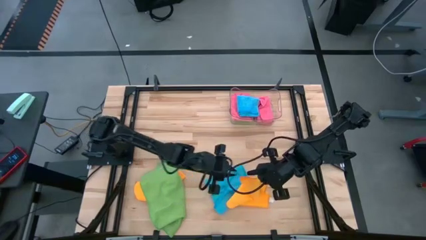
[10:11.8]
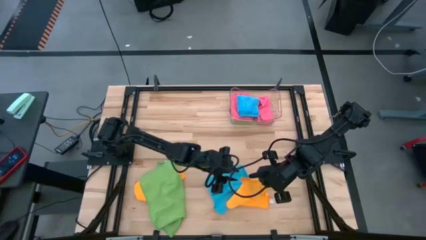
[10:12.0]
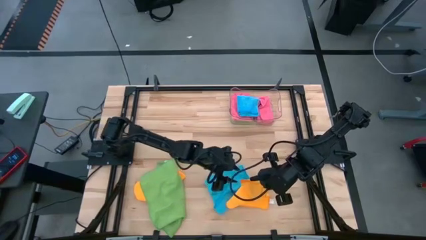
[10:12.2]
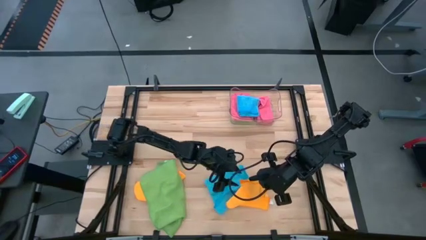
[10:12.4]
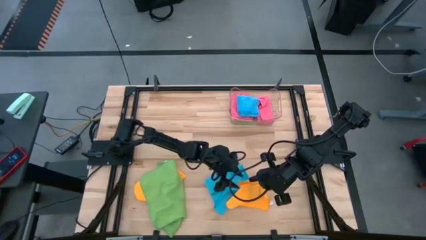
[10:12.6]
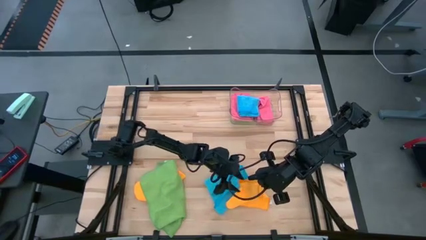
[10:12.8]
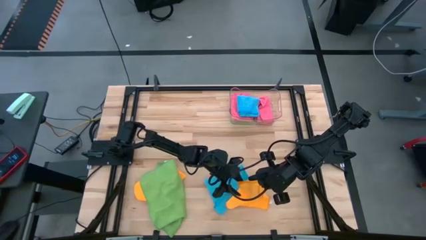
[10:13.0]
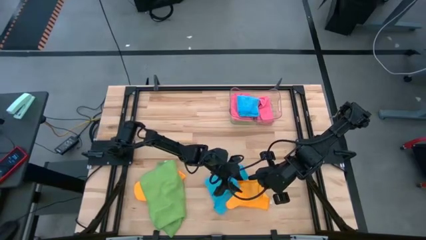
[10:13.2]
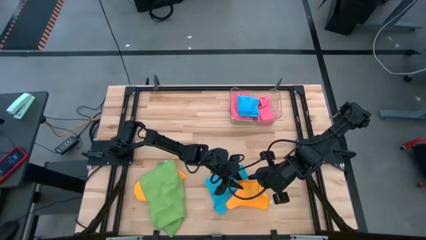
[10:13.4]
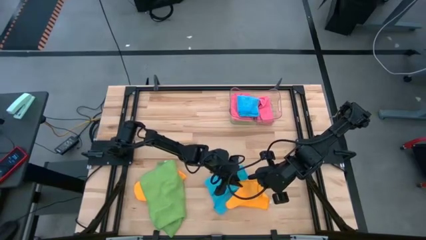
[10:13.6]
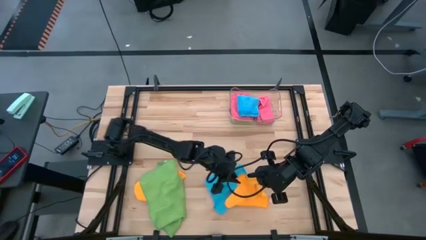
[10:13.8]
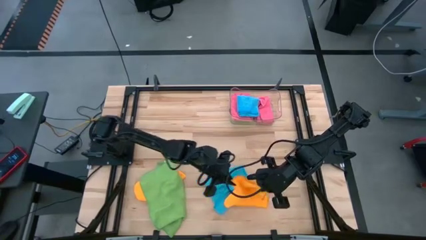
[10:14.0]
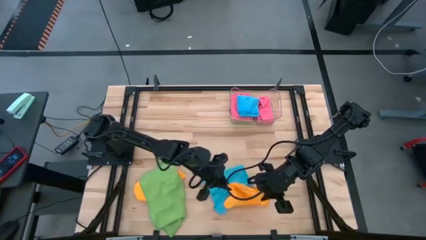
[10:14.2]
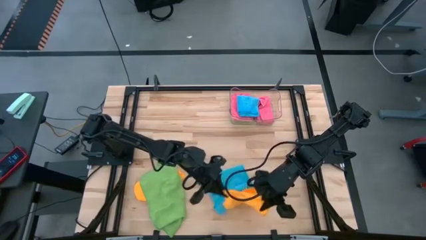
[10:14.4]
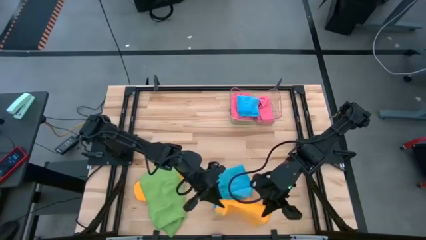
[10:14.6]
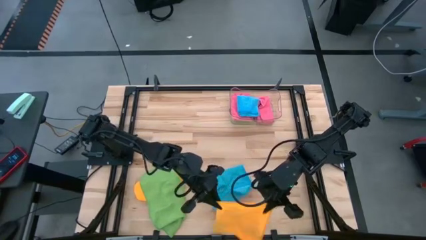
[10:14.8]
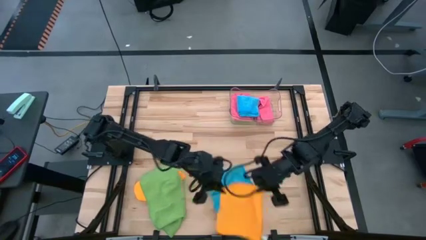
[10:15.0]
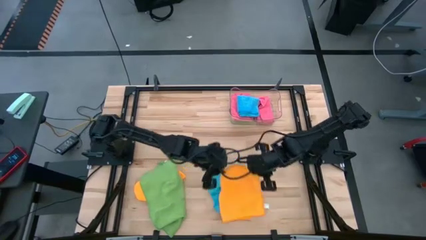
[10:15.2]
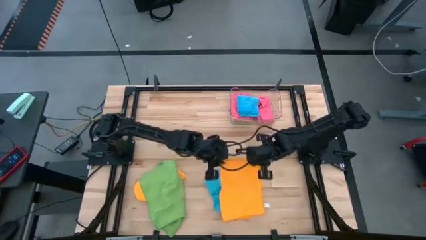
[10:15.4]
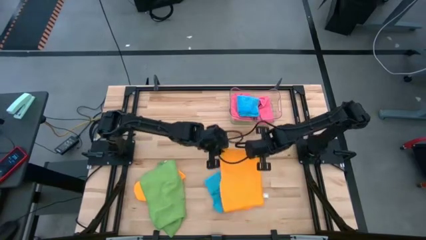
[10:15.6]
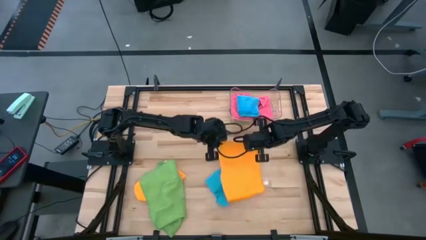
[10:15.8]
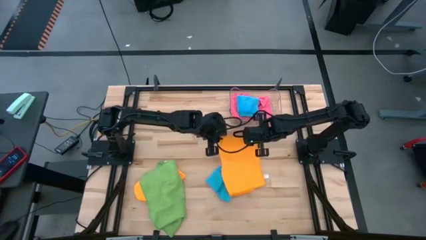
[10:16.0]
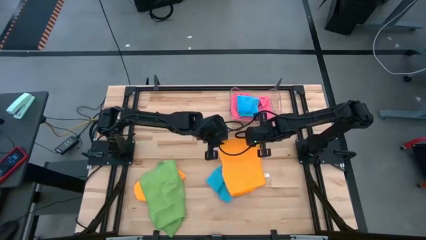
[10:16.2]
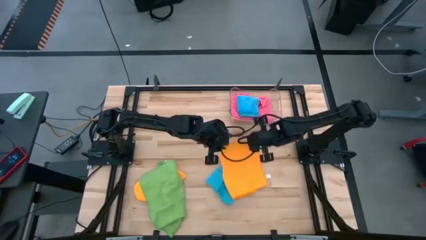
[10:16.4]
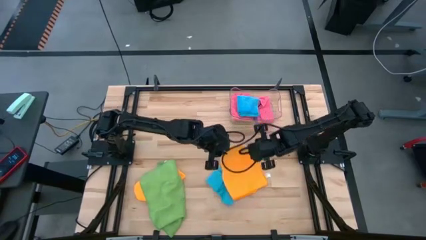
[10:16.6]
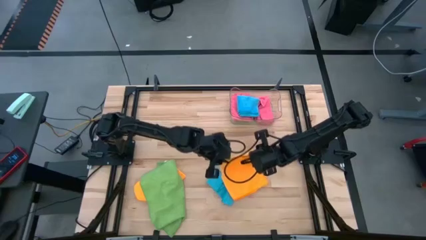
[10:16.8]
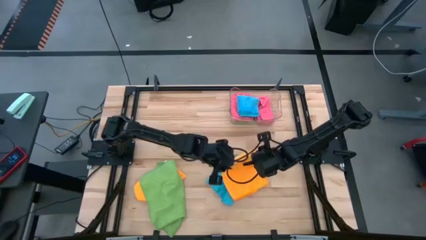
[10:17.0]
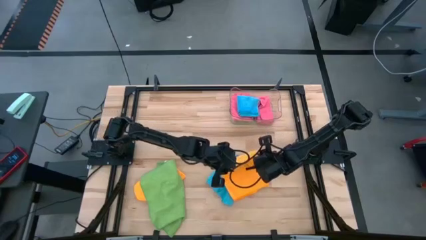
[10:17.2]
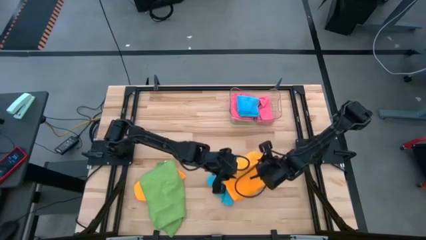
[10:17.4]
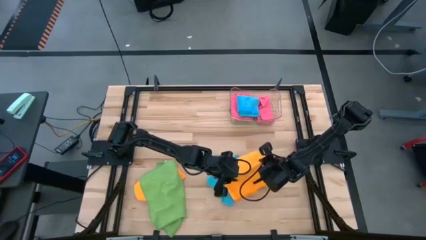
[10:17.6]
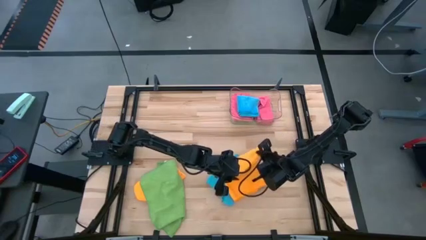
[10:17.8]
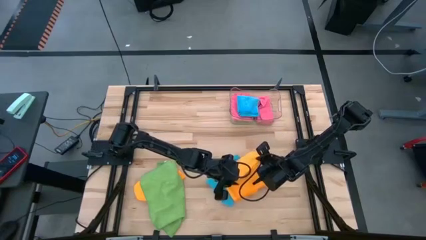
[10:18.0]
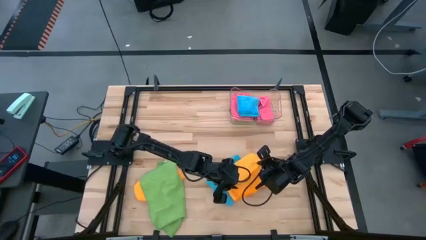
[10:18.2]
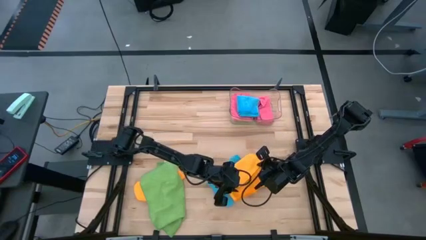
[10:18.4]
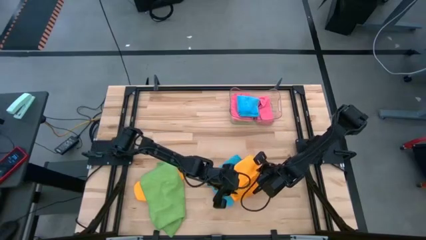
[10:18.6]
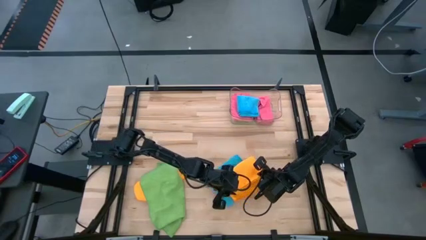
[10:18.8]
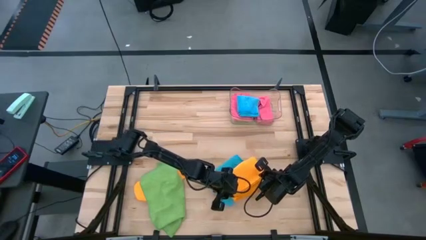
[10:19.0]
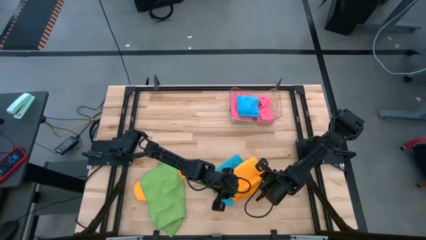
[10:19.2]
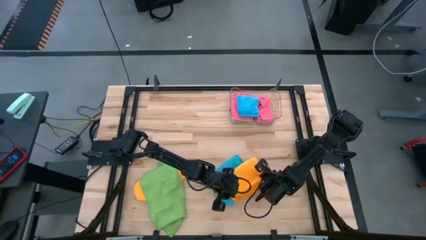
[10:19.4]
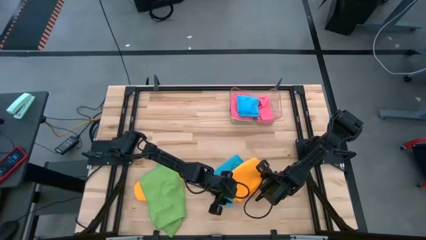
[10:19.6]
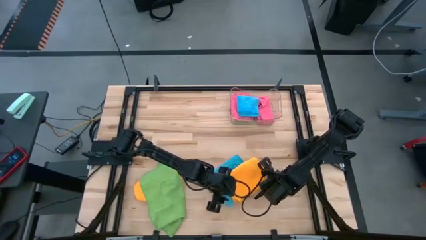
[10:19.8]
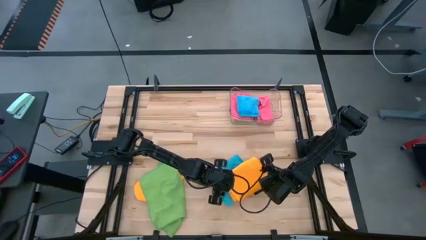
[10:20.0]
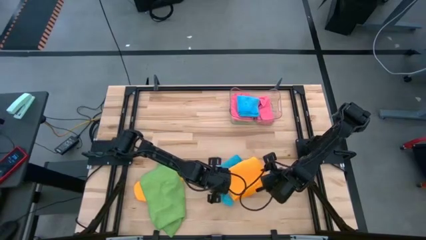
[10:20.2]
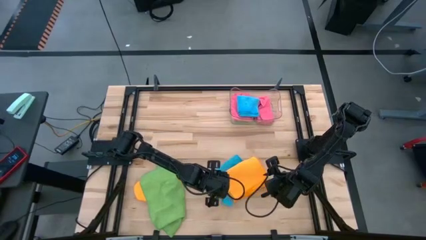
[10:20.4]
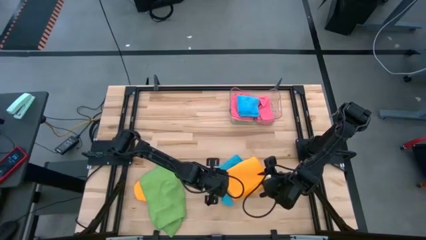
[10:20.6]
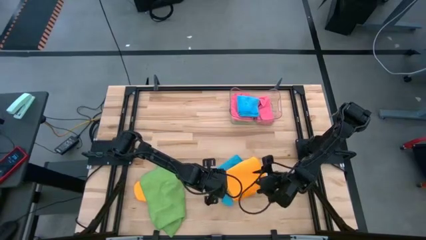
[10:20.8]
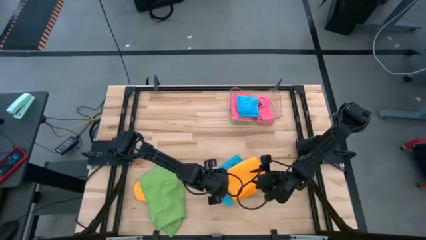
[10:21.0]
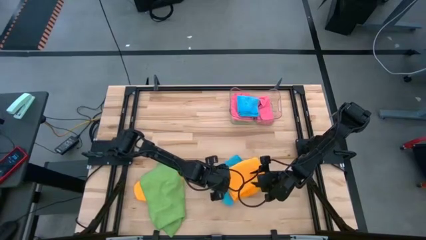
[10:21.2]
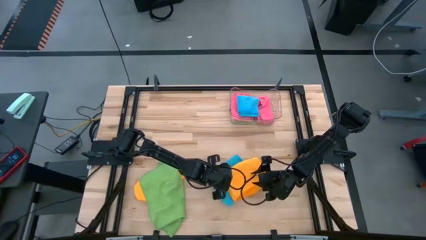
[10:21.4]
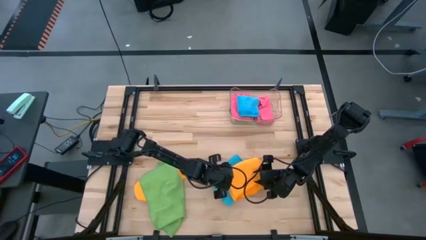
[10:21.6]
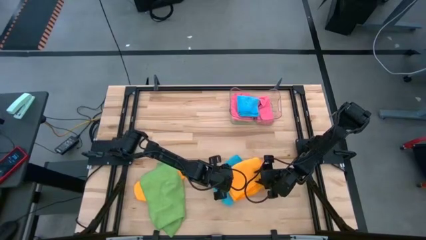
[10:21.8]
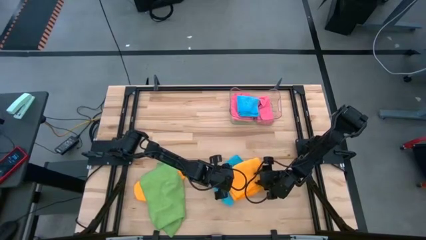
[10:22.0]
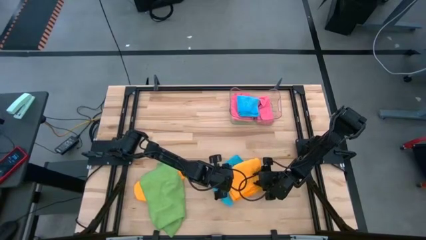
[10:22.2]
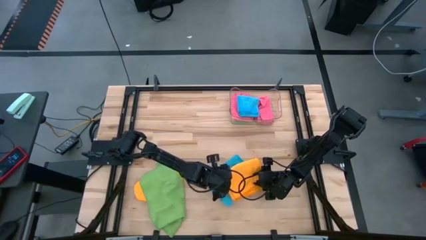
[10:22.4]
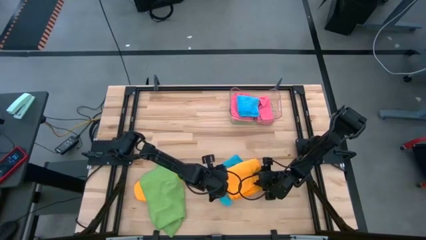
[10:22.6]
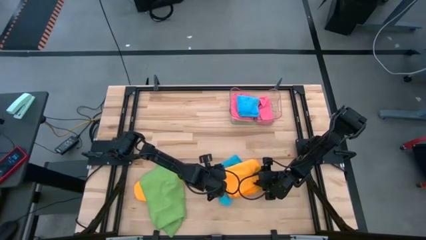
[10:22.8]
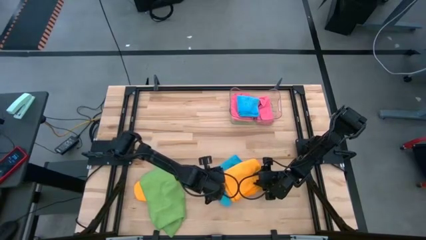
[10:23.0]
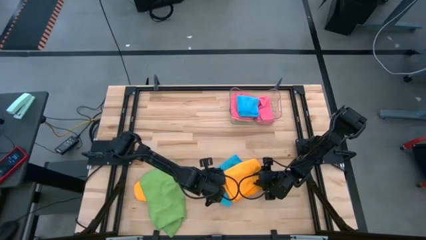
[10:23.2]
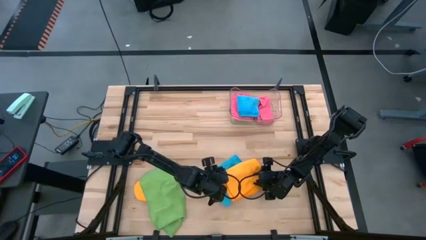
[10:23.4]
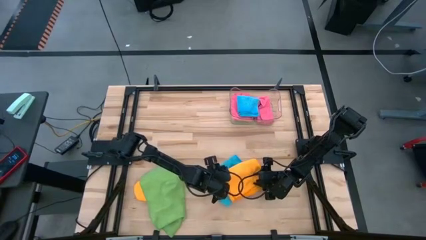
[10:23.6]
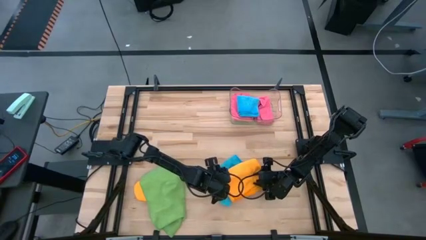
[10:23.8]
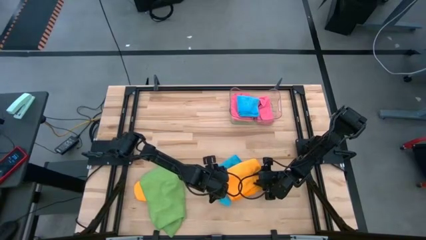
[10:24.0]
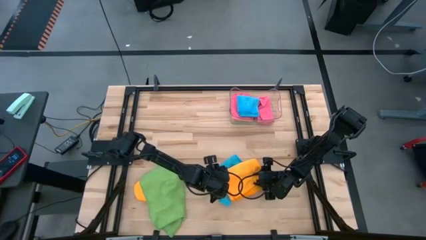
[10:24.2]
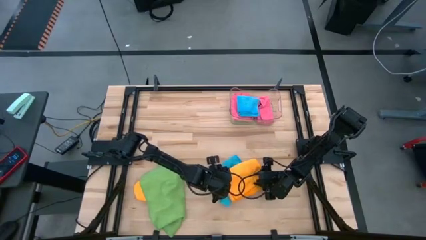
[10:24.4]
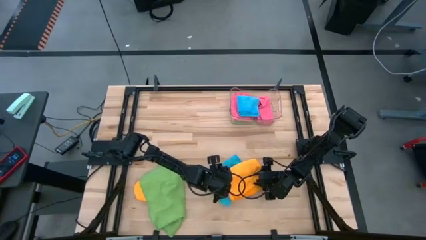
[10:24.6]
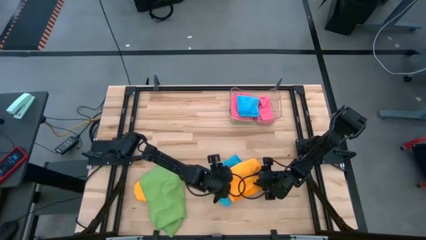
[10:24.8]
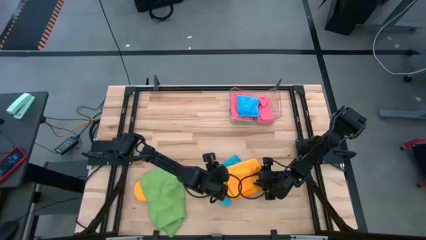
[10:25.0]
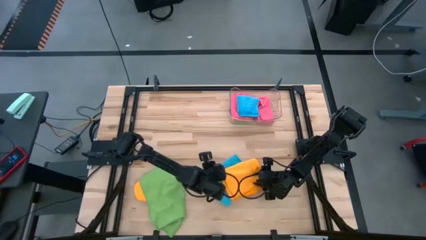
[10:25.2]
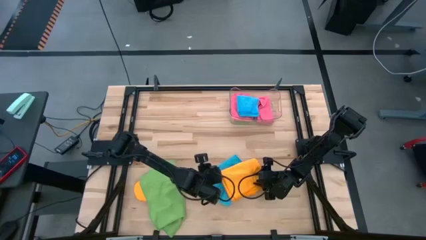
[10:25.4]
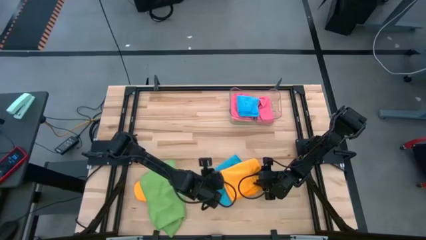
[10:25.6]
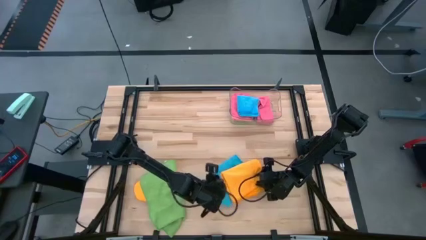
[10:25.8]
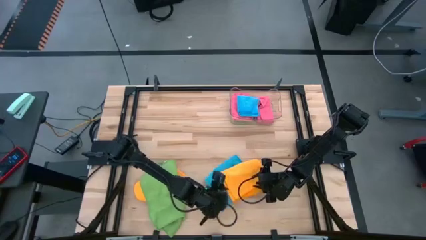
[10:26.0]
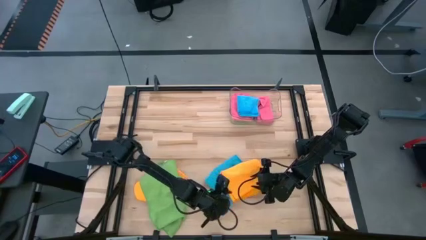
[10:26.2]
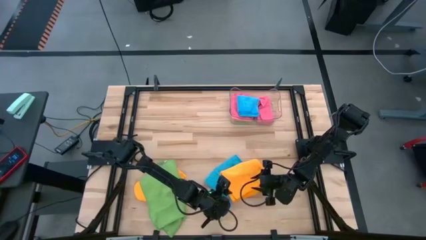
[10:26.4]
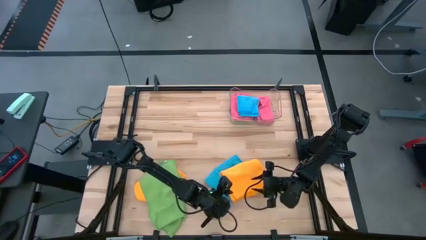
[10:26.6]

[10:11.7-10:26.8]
Task: Fold microfiber towels
Fold the right yellow towel
